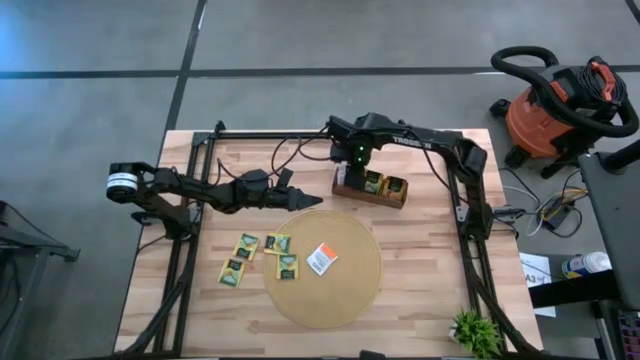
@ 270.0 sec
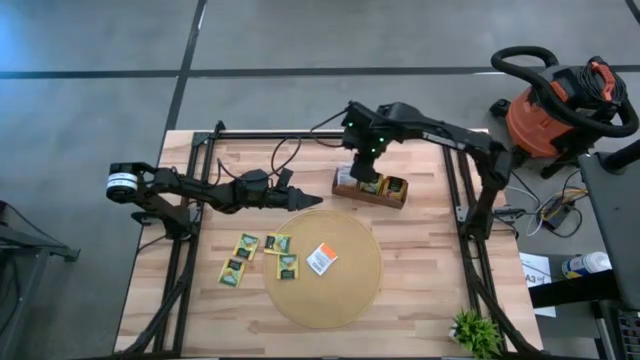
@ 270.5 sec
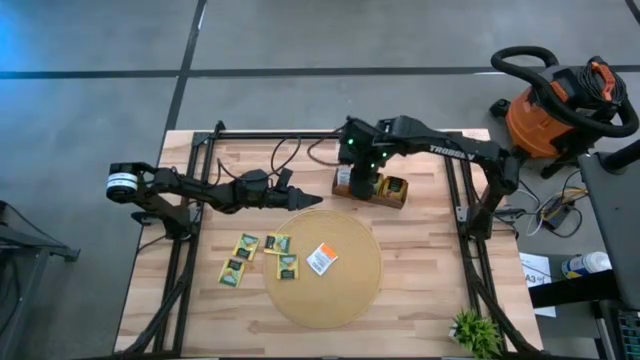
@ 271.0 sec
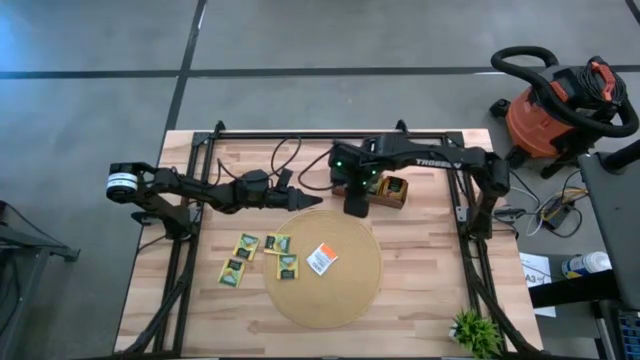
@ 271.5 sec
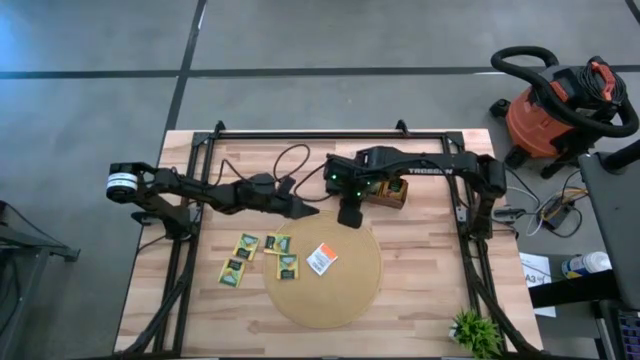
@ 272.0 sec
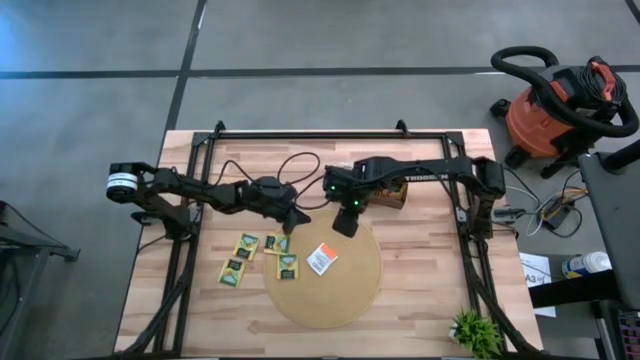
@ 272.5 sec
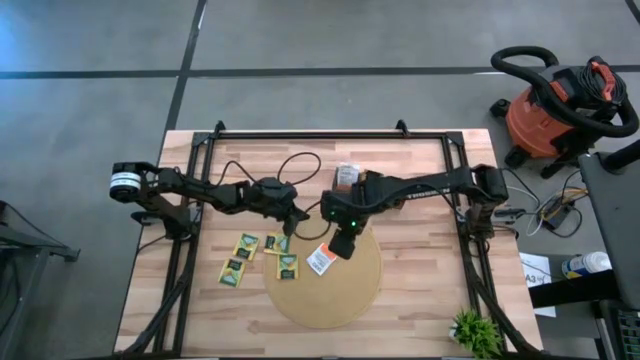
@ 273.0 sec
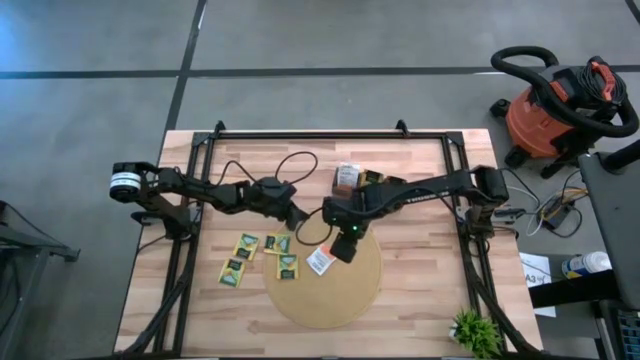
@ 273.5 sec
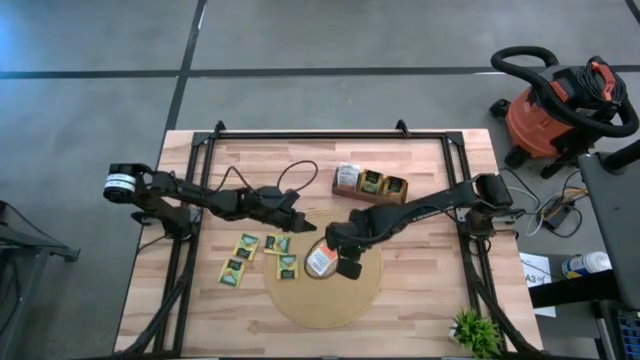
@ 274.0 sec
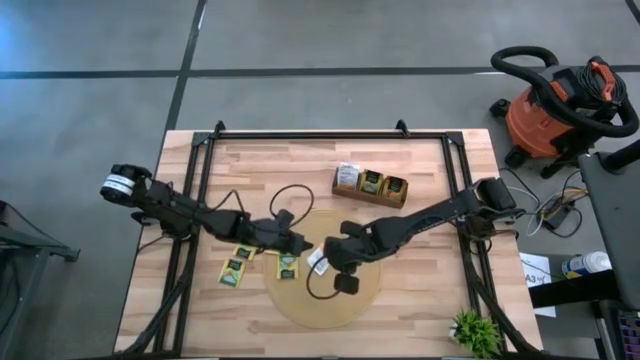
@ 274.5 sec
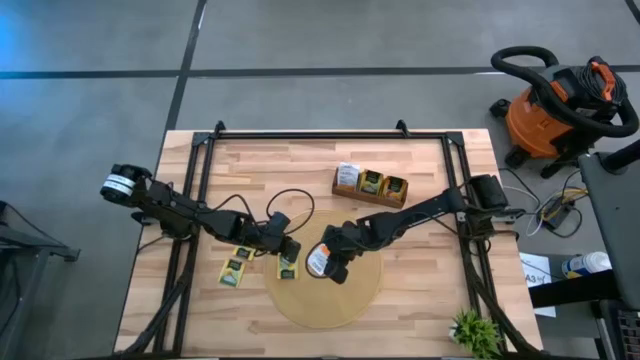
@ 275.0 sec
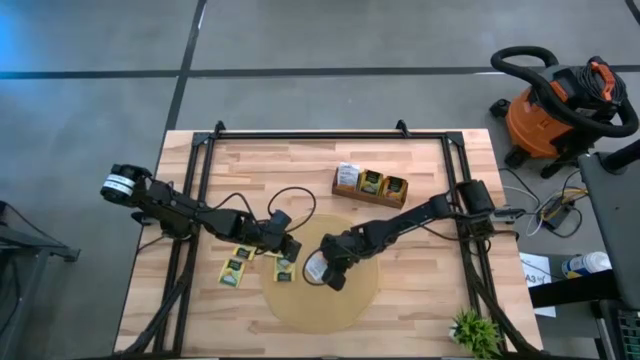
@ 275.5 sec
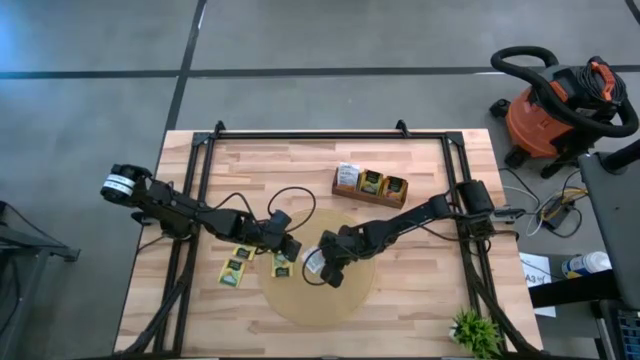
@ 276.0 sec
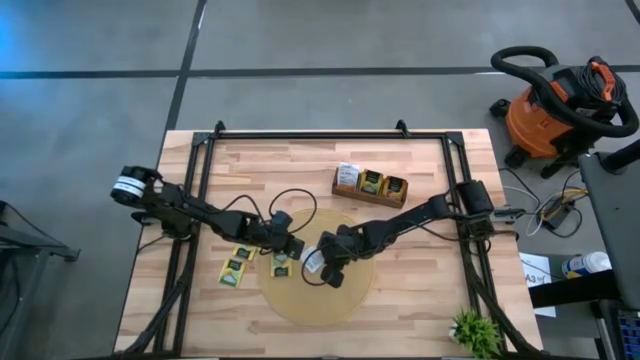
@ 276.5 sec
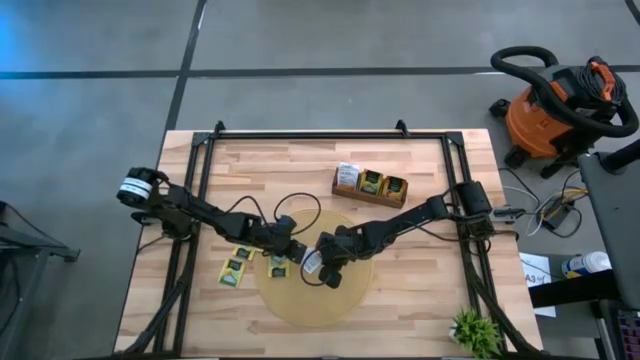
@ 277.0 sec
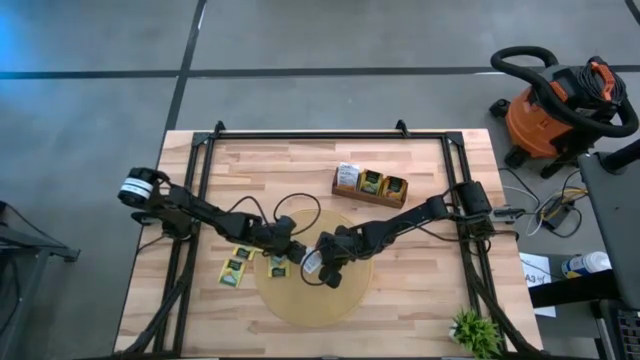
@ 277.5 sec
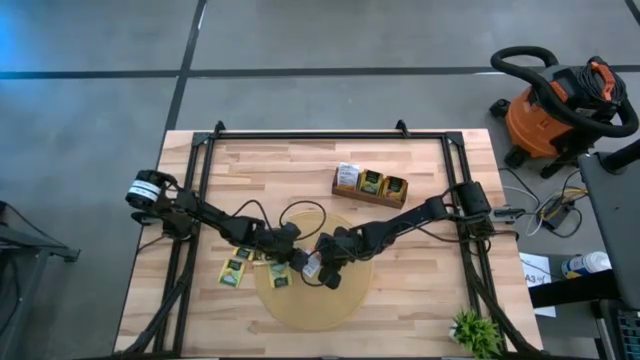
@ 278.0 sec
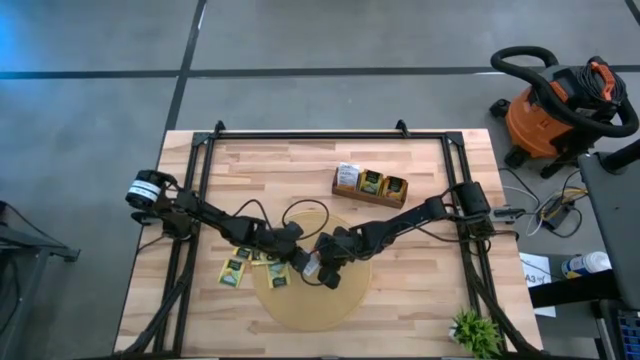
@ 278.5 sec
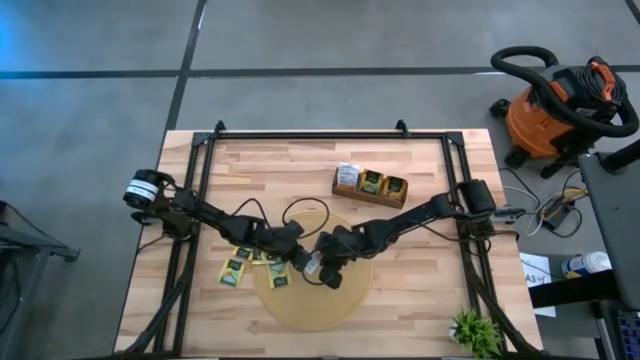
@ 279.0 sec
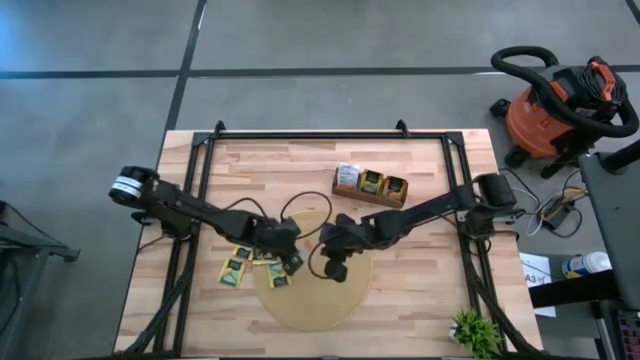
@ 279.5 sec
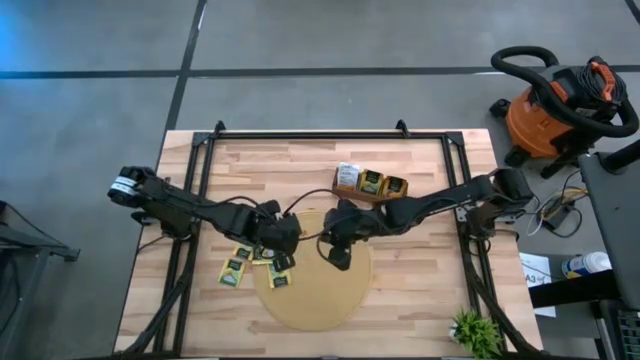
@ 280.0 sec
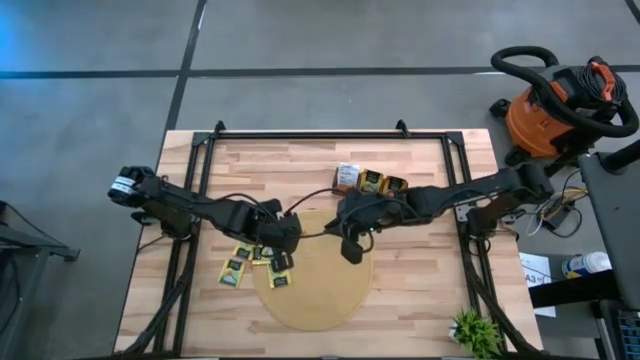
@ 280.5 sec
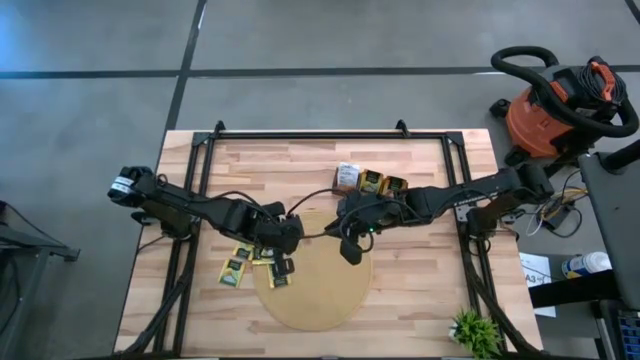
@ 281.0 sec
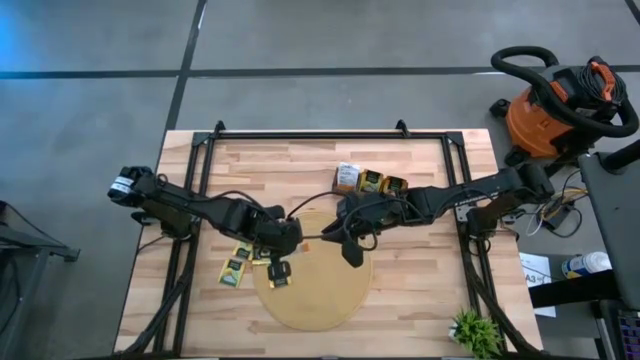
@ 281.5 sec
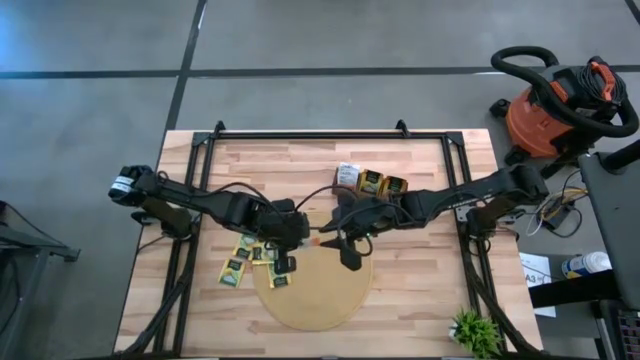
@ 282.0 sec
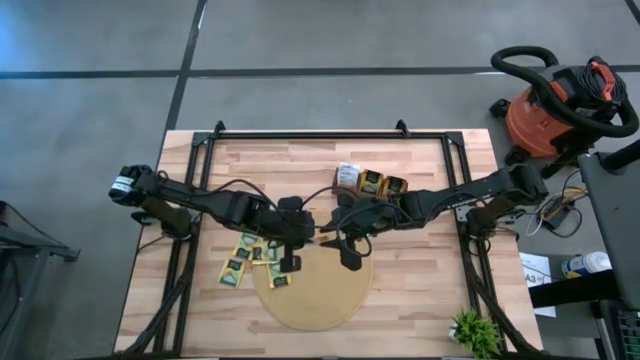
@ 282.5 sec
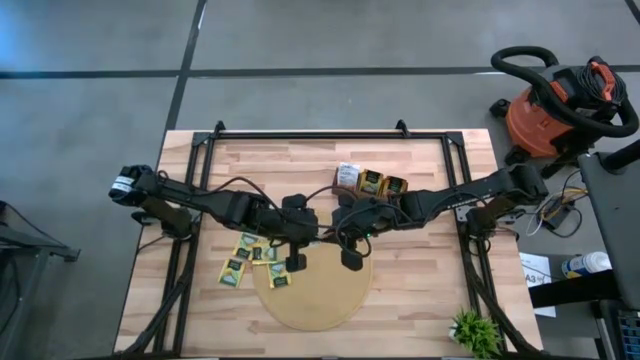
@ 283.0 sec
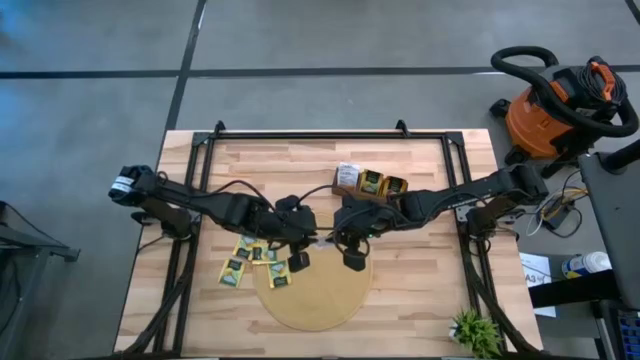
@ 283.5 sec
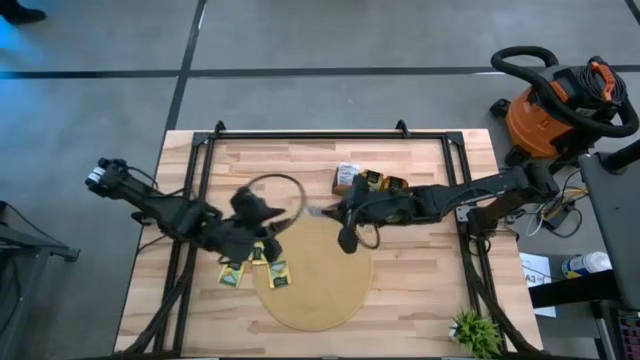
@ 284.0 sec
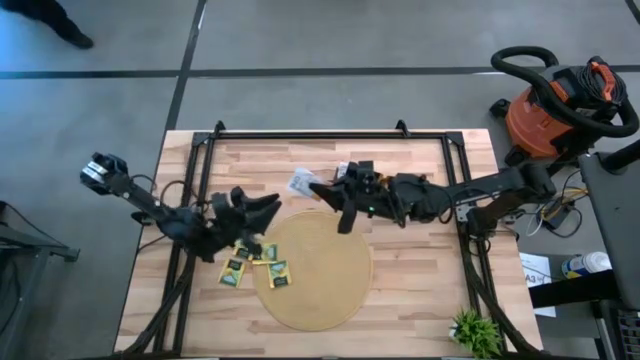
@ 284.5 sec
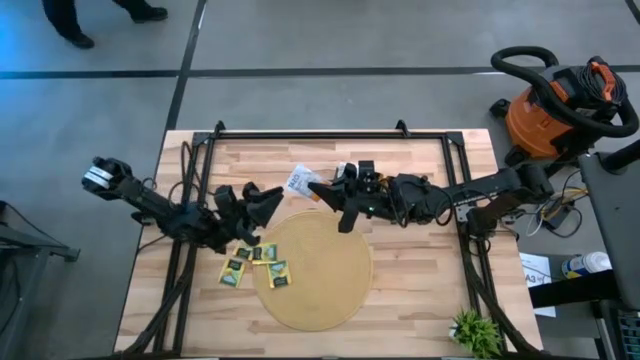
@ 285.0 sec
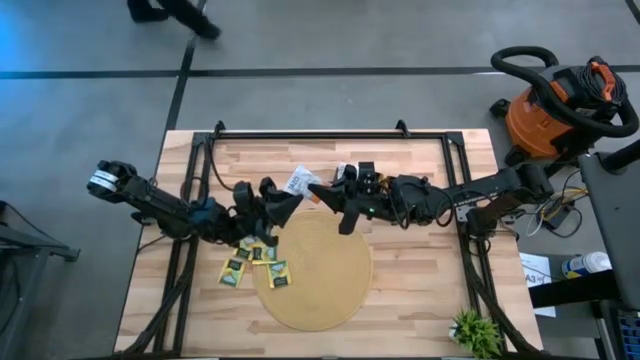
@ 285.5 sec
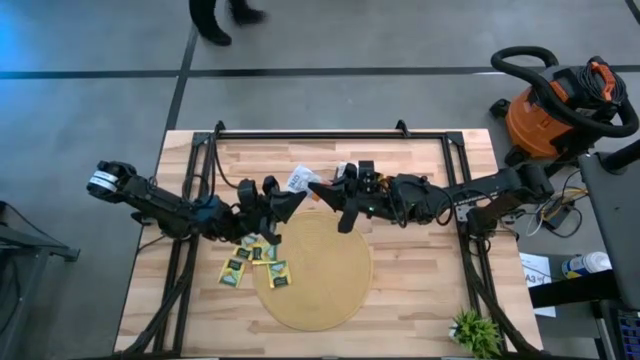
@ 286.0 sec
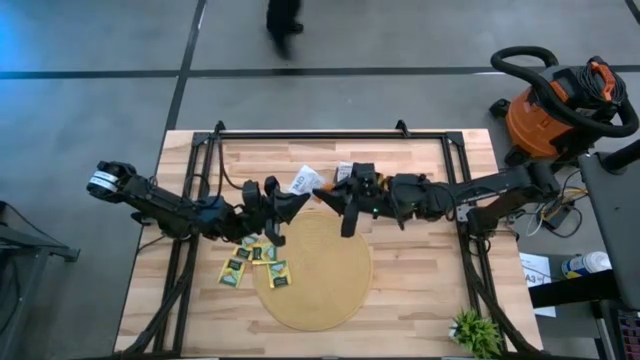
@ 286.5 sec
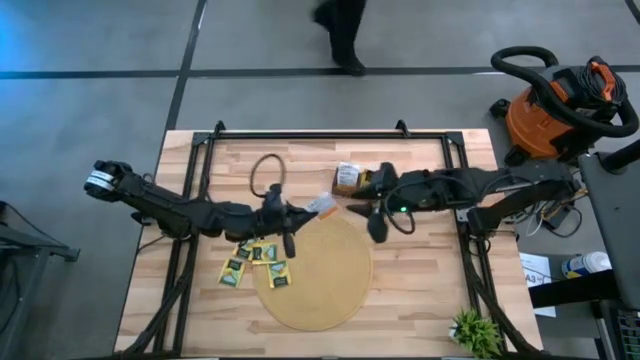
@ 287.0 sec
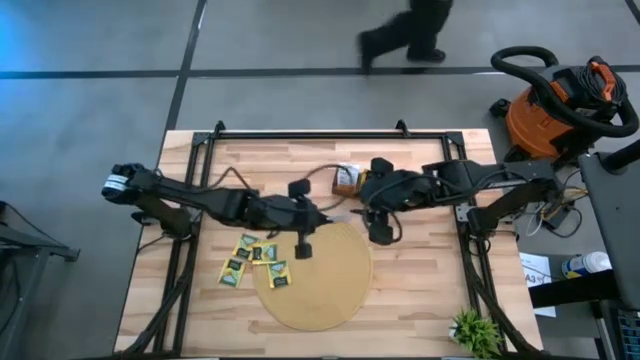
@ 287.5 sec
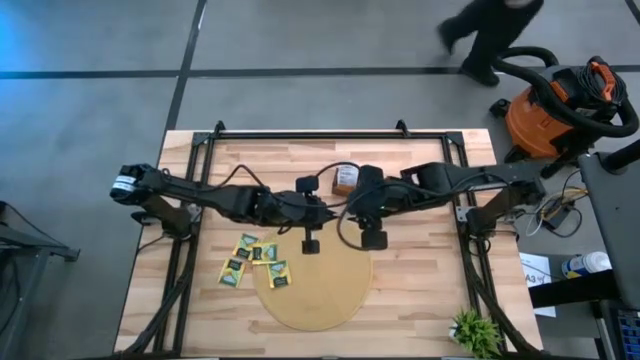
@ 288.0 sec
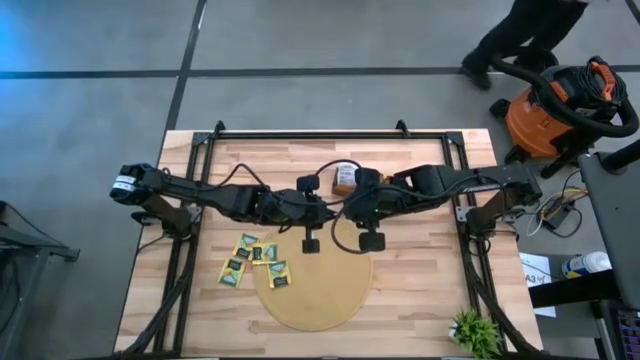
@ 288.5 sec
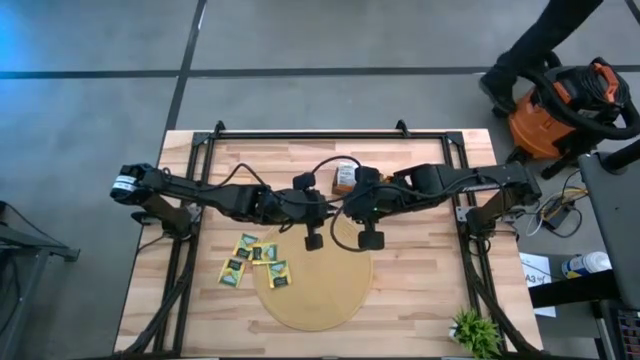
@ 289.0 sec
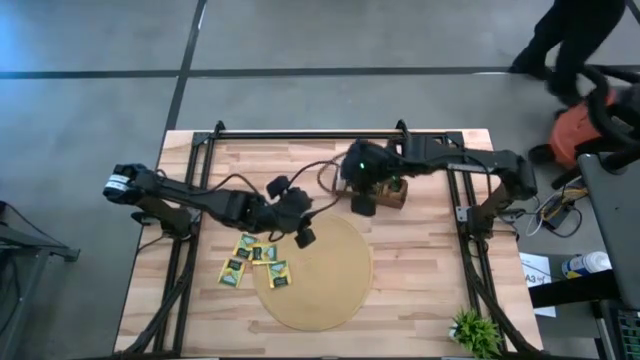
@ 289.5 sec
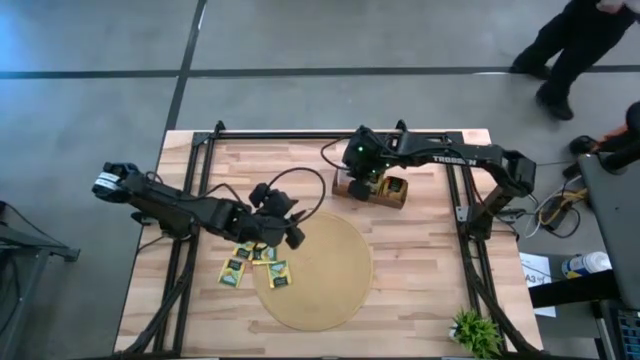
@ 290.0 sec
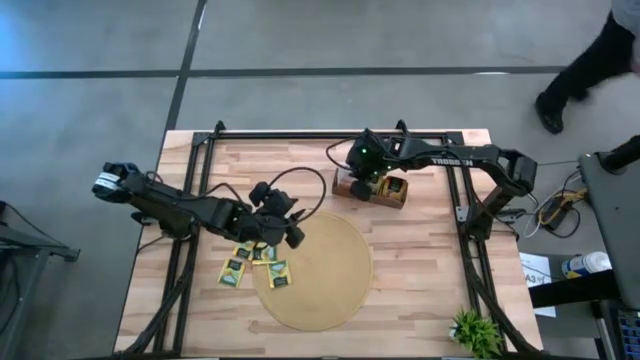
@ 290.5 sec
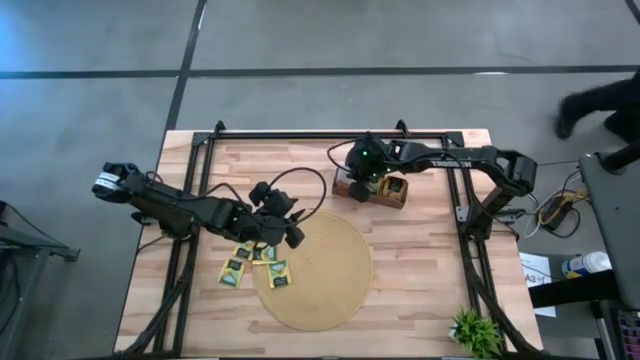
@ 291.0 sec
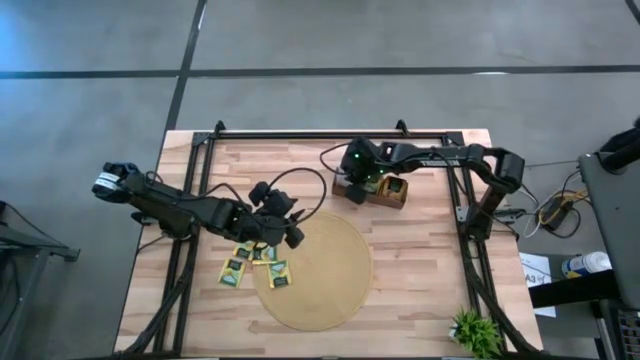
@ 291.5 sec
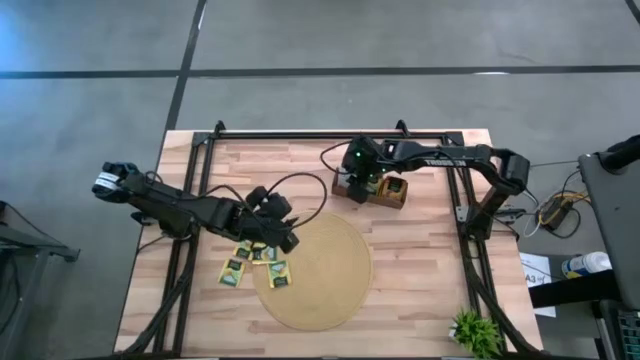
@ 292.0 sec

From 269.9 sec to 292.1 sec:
Task: Pick & Place Tea
Put the orange tea bag into the left section of the wooden organizer
